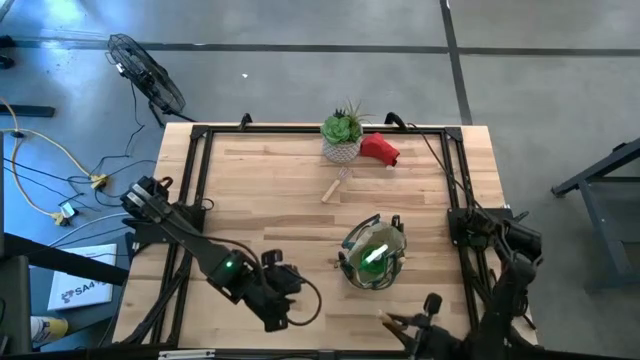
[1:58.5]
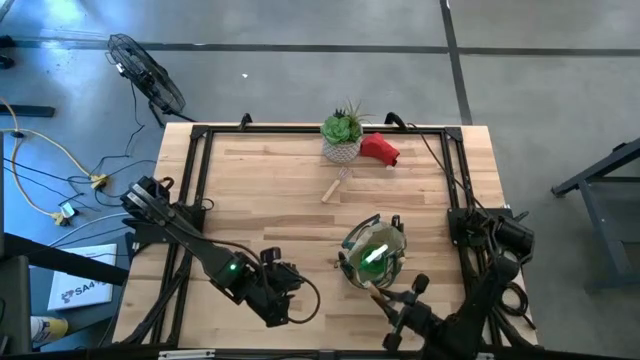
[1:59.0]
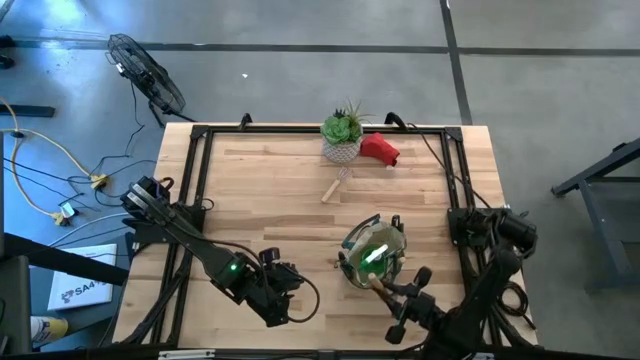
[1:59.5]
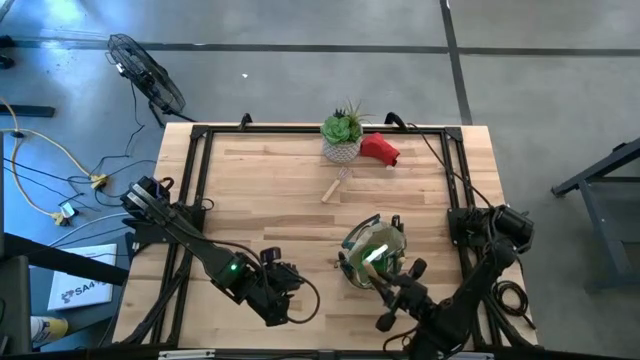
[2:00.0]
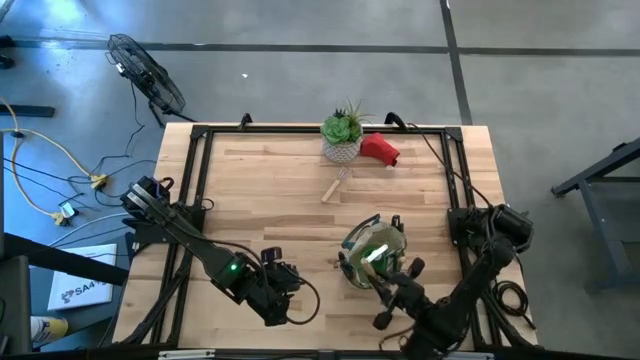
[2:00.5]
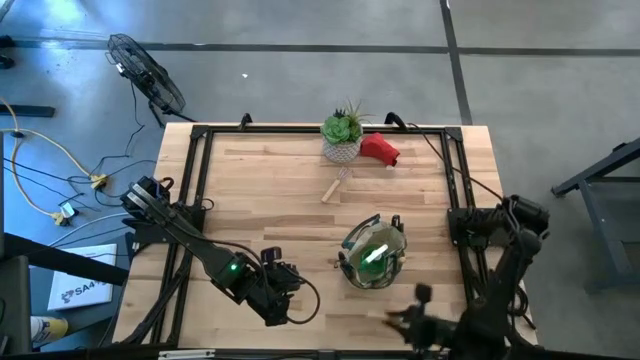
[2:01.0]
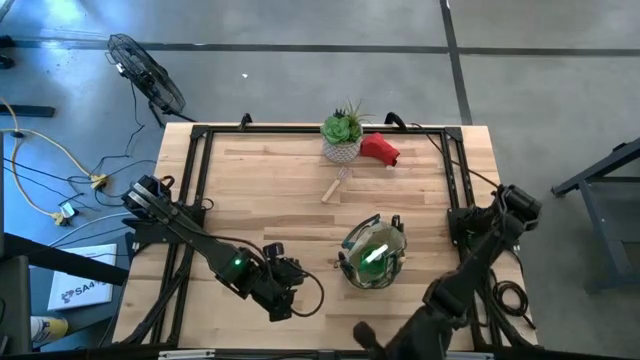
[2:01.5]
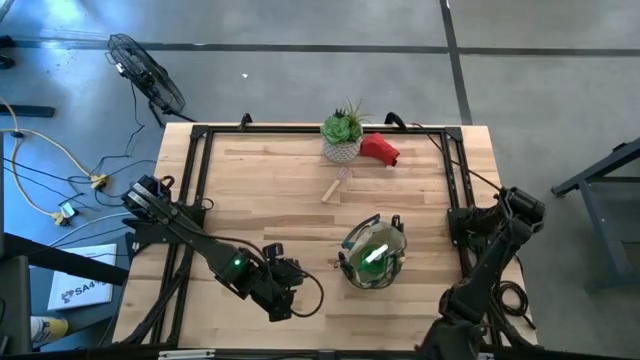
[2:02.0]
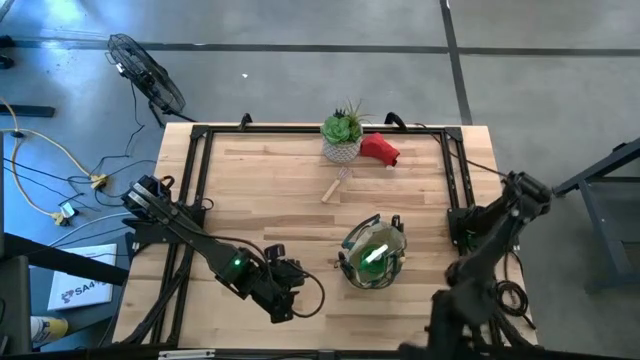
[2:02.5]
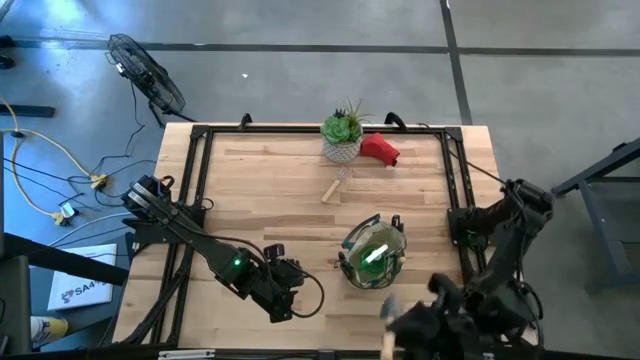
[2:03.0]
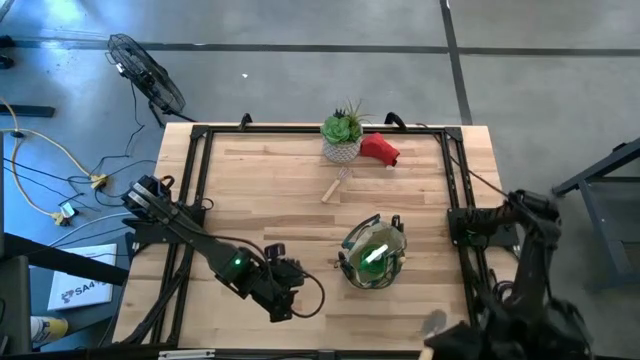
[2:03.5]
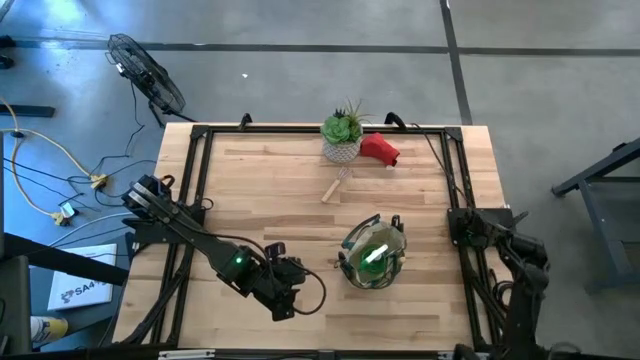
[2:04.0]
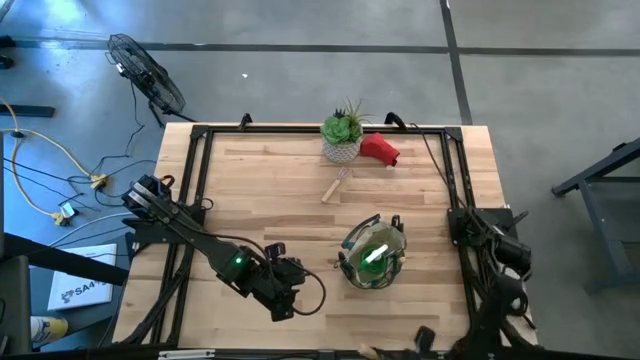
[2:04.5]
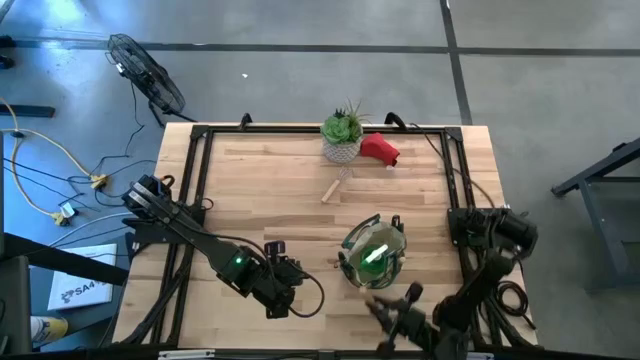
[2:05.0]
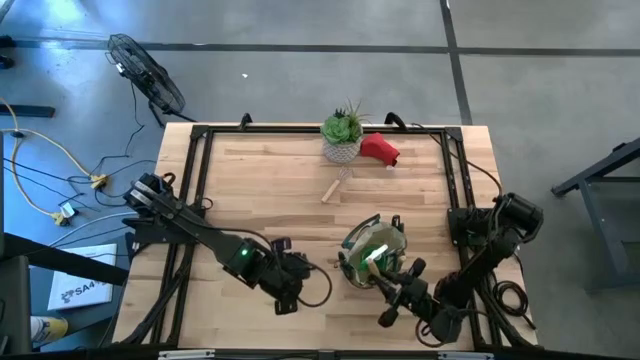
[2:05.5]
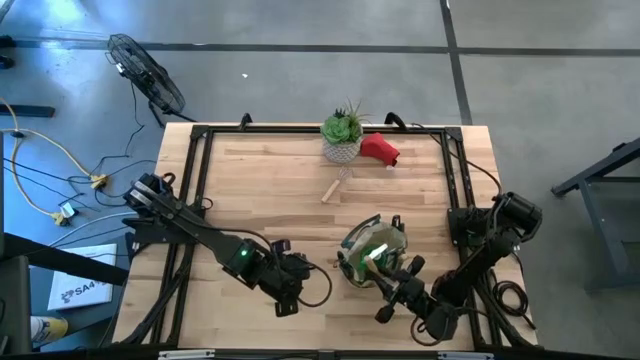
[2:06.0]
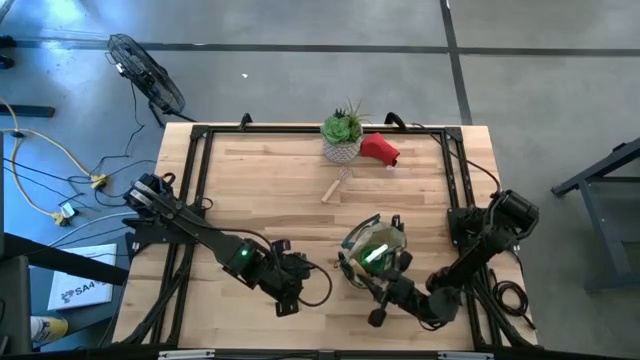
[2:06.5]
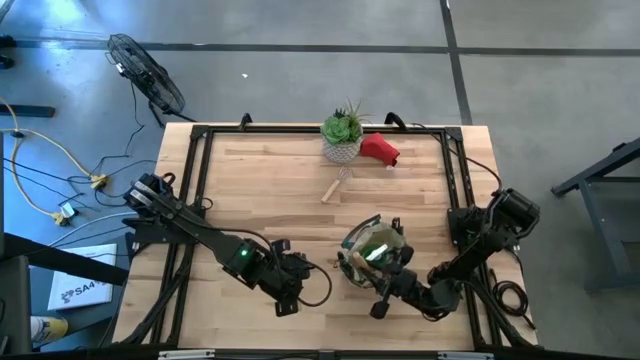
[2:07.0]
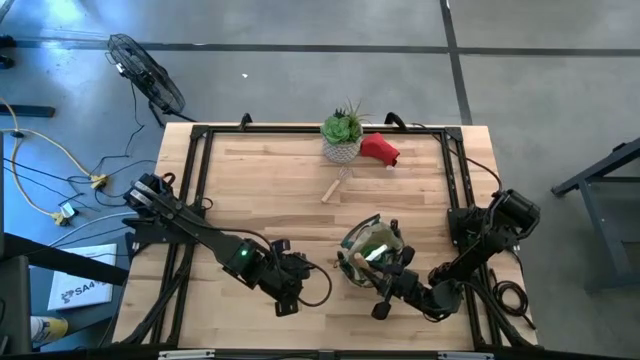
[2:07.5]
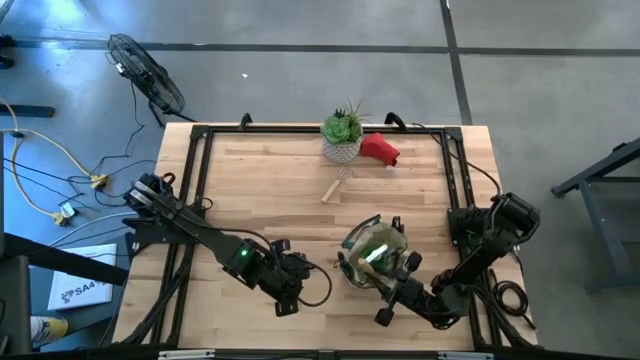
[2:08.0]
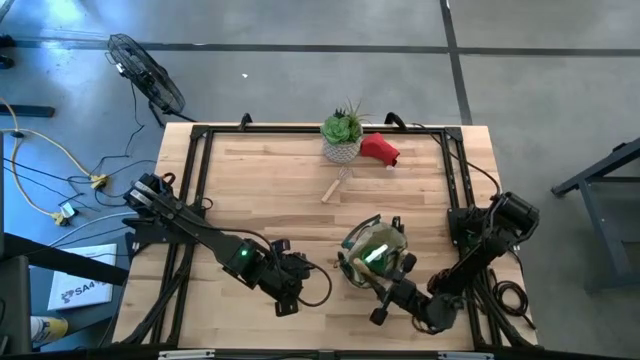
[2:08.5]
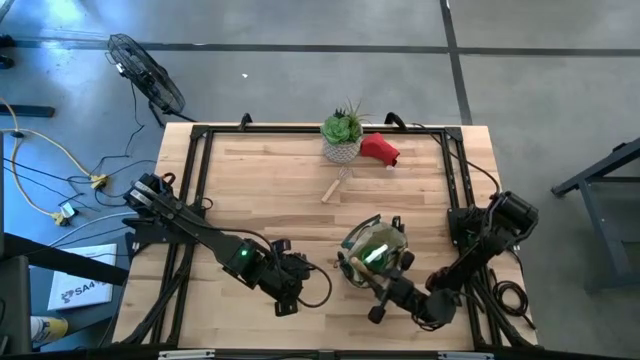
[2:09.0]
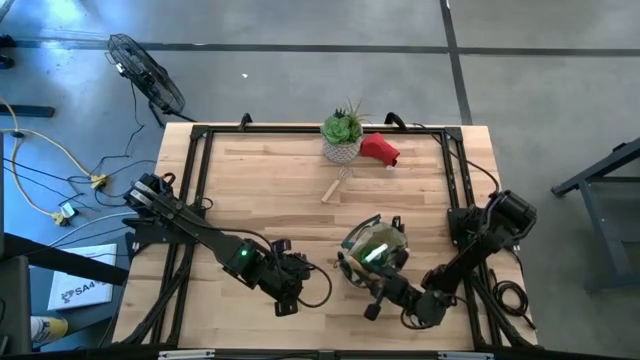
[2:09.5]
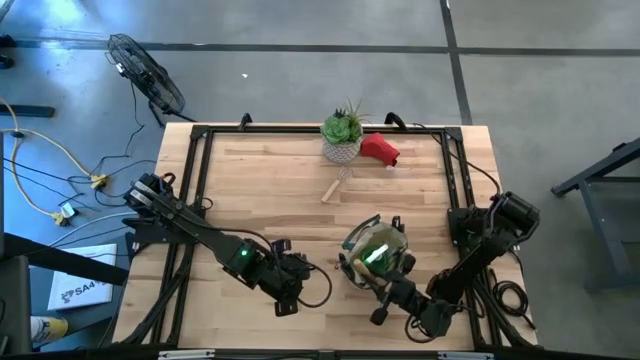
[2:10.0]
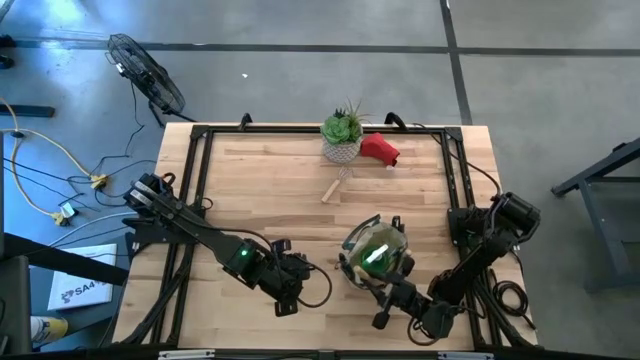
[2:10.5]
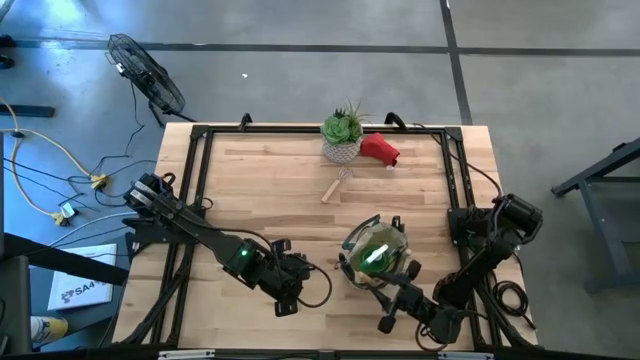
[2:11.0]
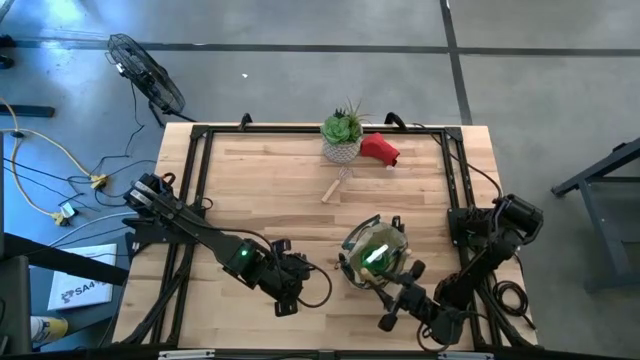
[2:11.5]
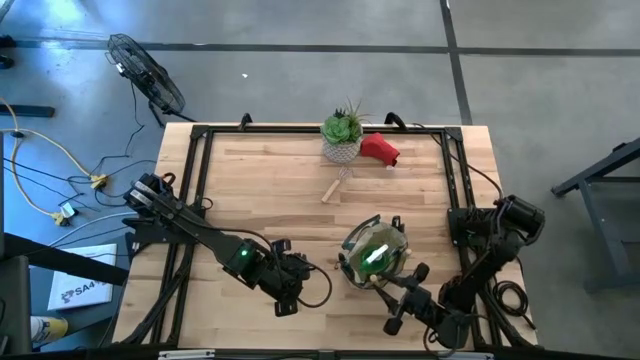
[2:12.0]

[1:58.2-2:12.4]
Task: Pick & Place Garden tools in Gardening bag
Put the brown trowel into the gardening bag

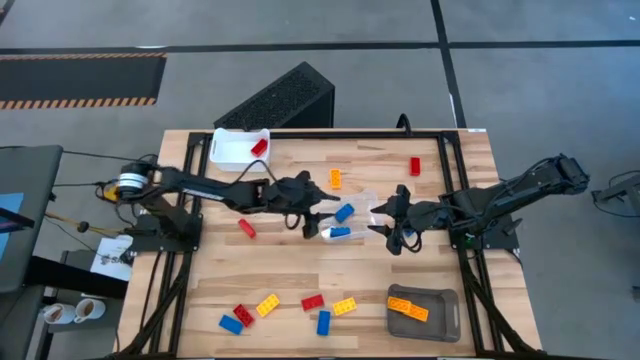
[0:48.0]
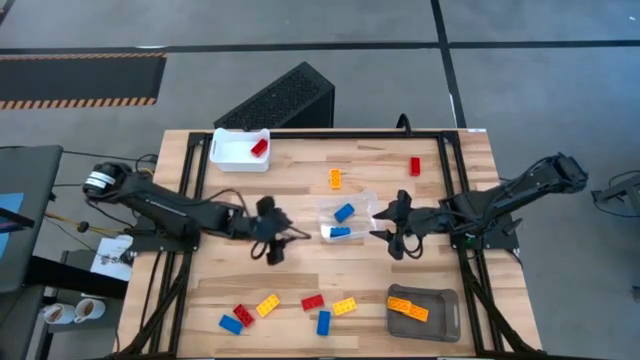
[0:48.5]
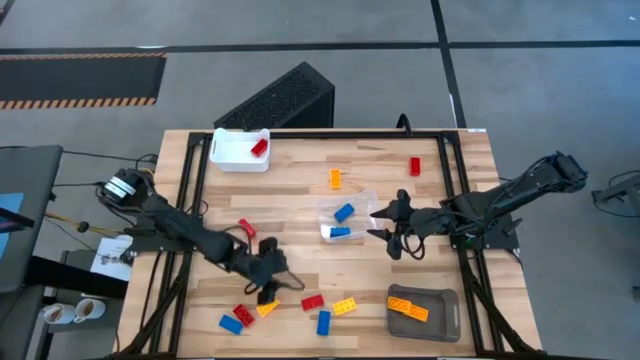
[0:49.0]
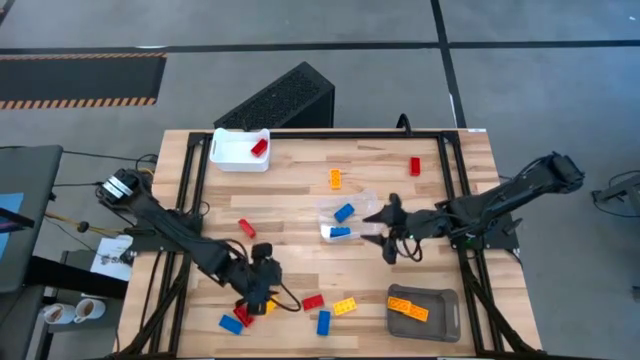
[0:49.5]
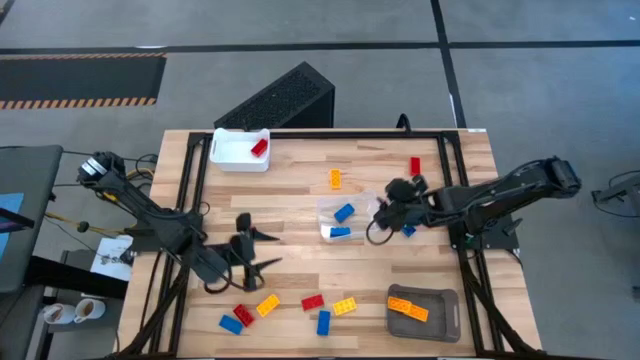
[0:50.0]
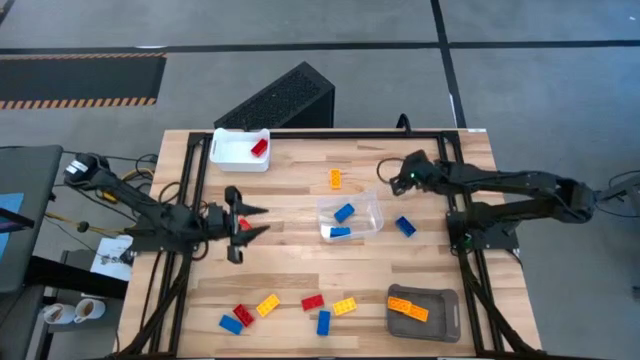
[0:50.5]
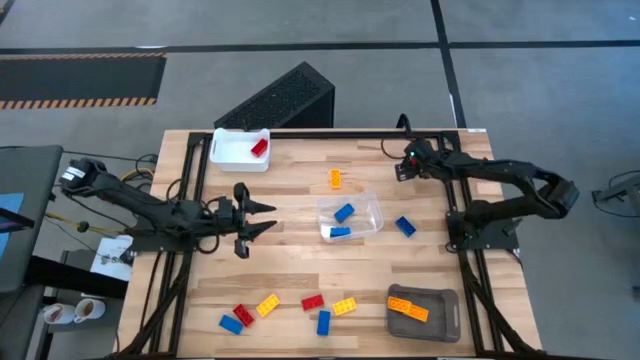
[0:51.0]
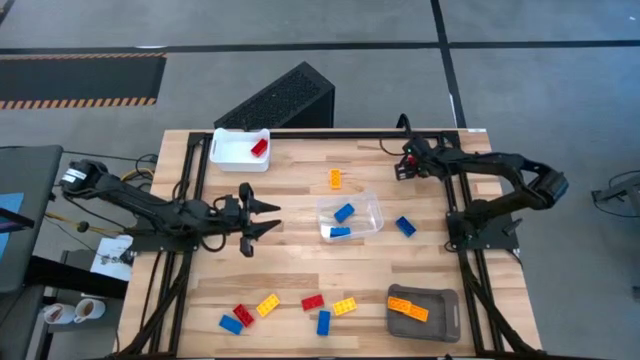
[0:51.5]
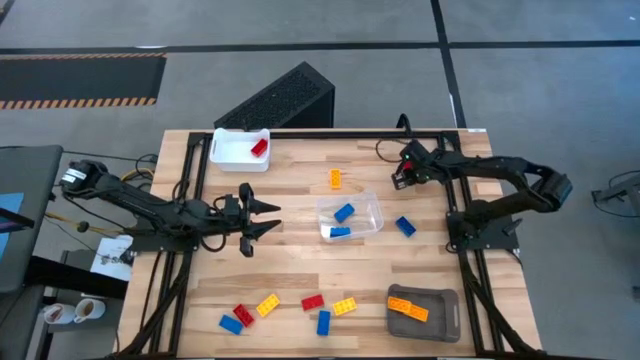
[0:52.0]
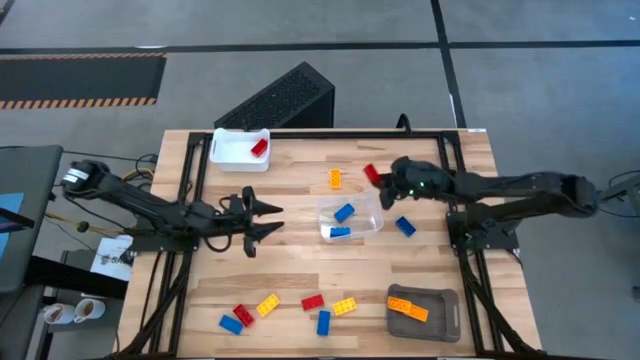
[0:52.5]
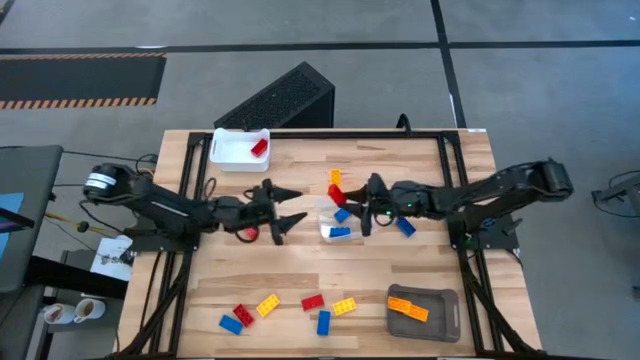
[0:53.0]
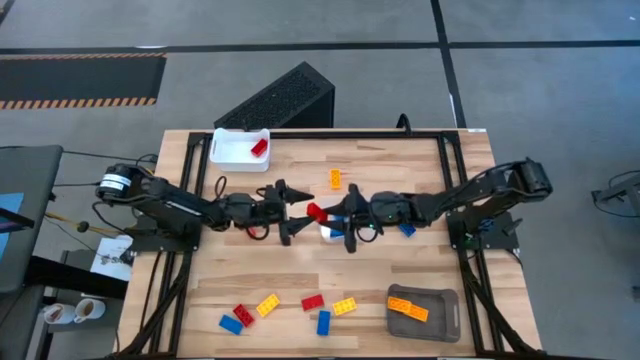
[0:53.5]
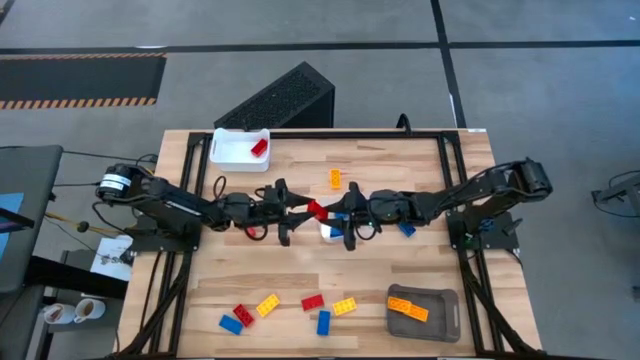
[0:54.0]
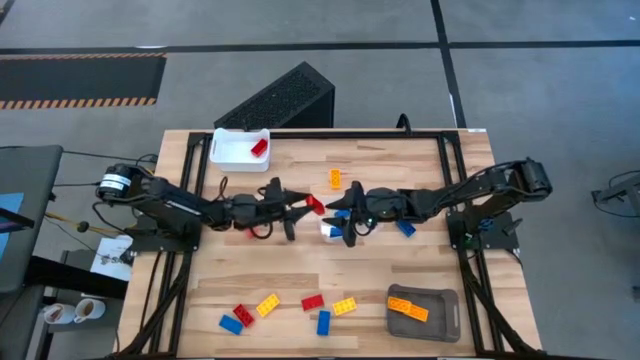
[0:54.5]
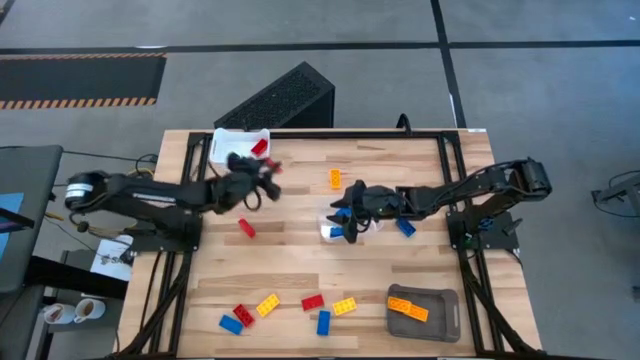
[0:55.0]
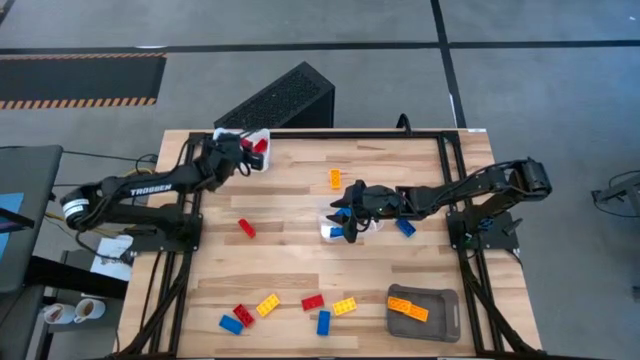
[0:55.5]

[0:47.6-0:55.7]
Task: Sort & place blocks by color
Put the red game piece into the white bin
